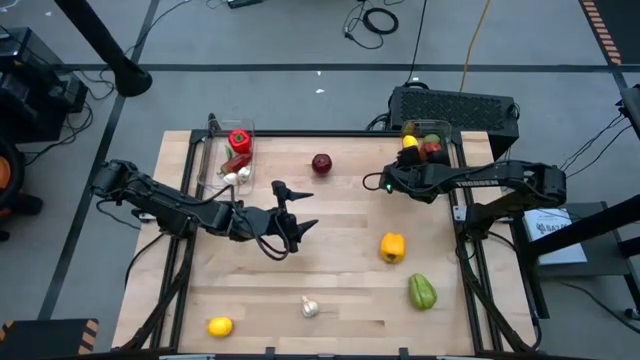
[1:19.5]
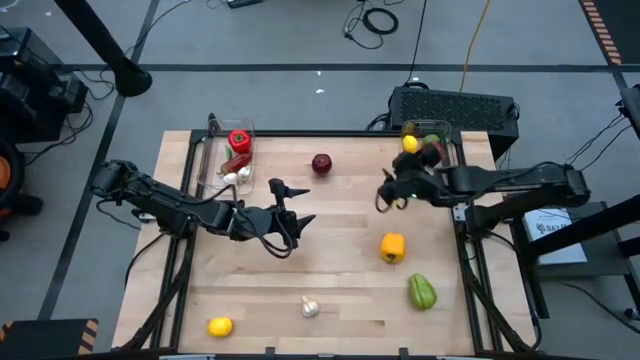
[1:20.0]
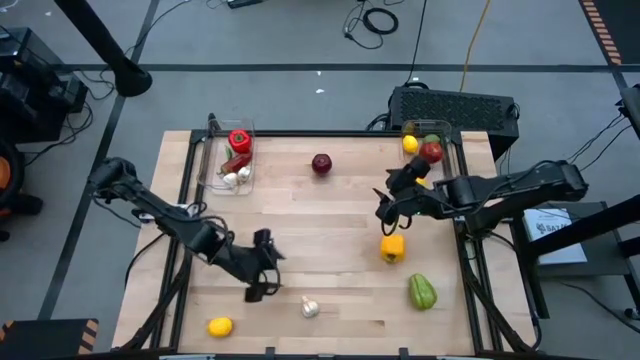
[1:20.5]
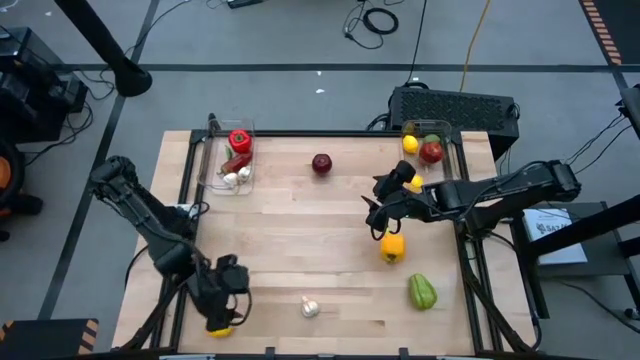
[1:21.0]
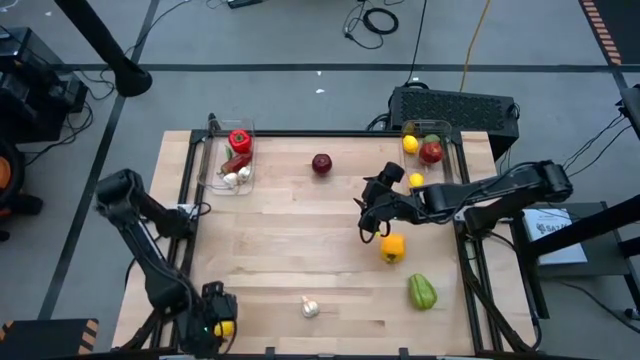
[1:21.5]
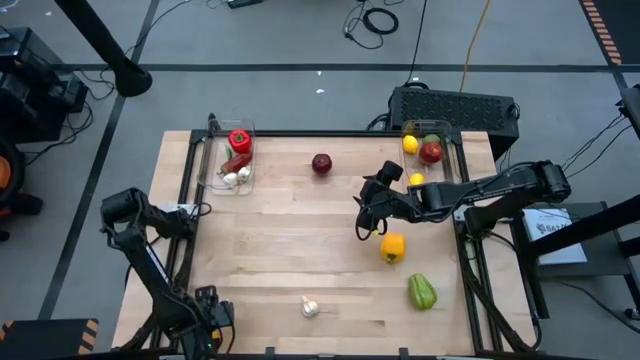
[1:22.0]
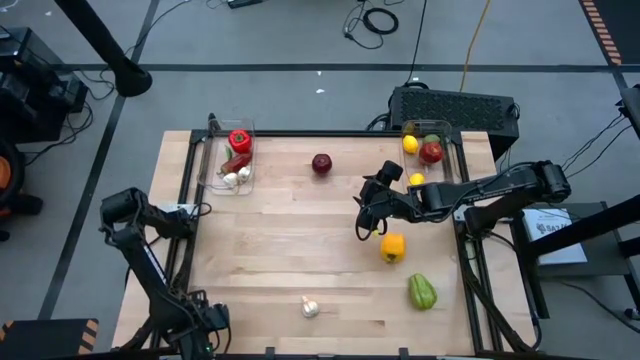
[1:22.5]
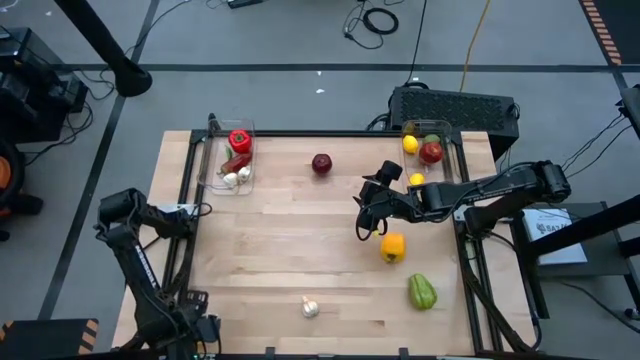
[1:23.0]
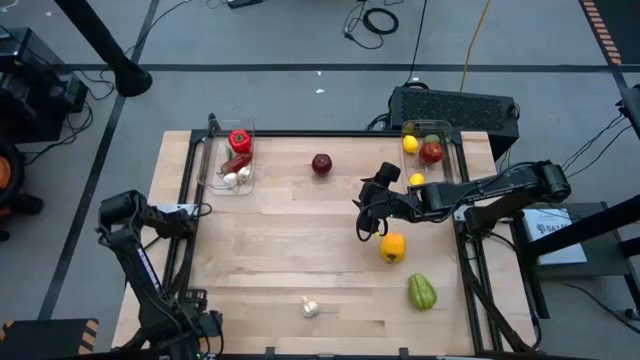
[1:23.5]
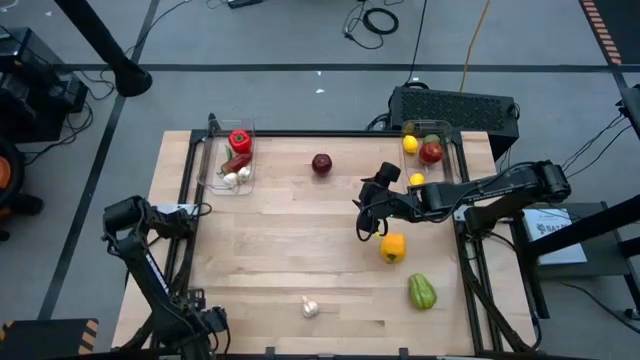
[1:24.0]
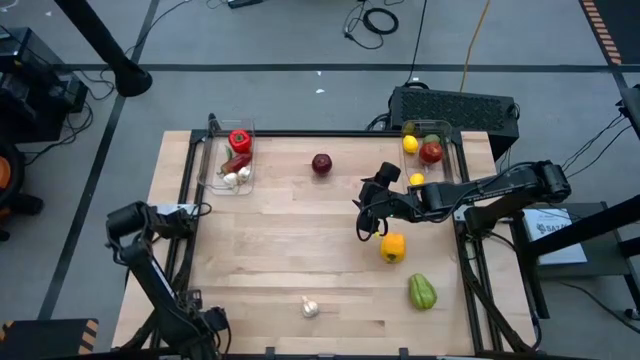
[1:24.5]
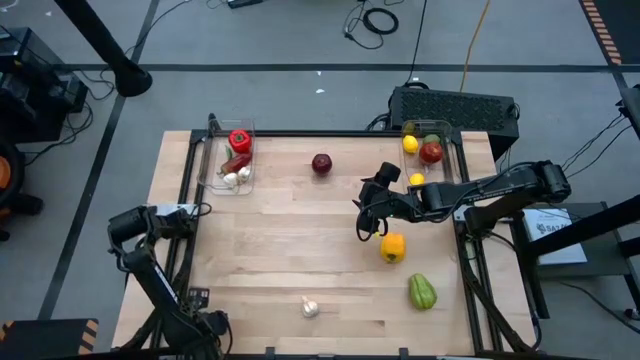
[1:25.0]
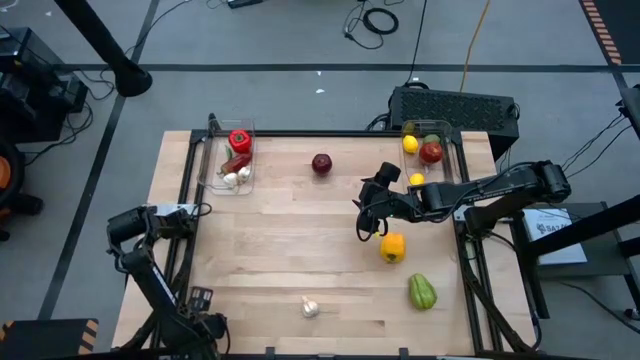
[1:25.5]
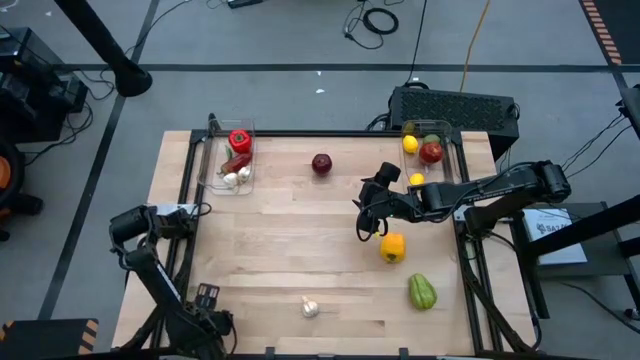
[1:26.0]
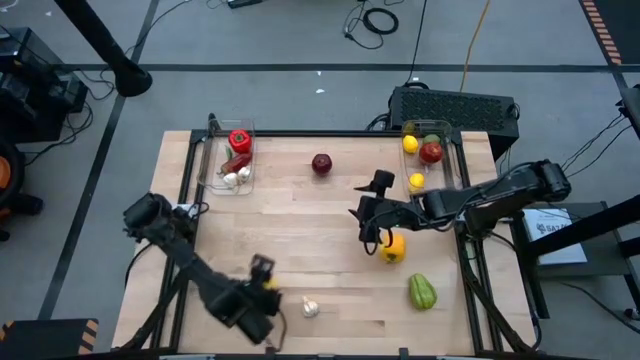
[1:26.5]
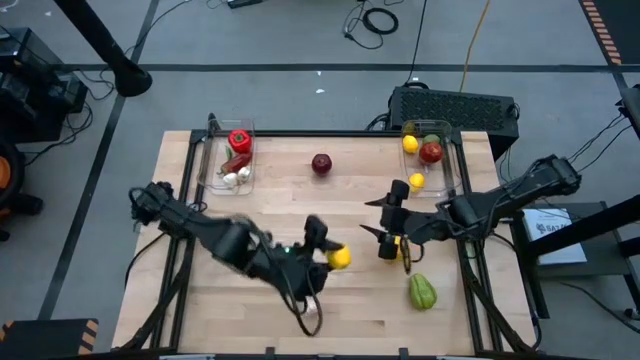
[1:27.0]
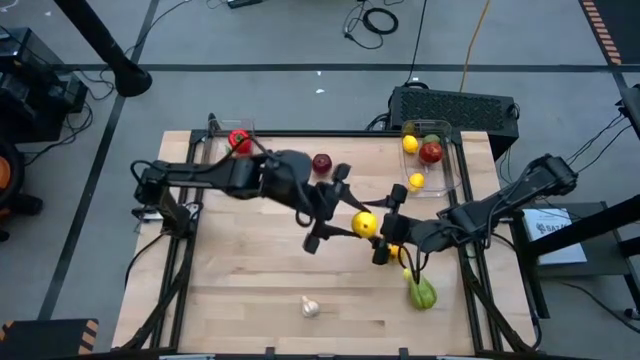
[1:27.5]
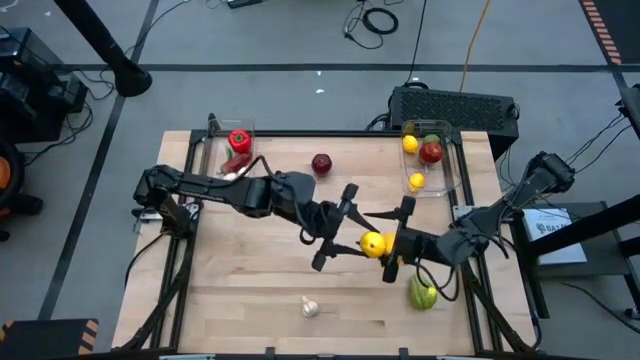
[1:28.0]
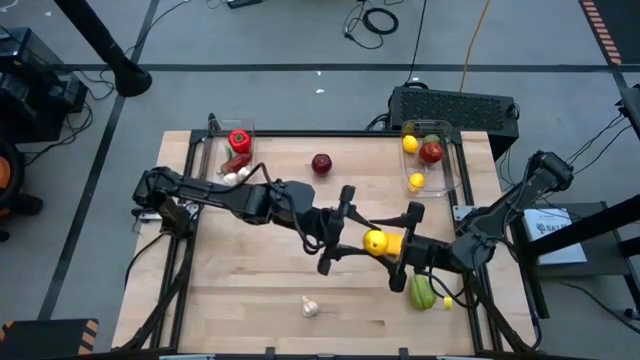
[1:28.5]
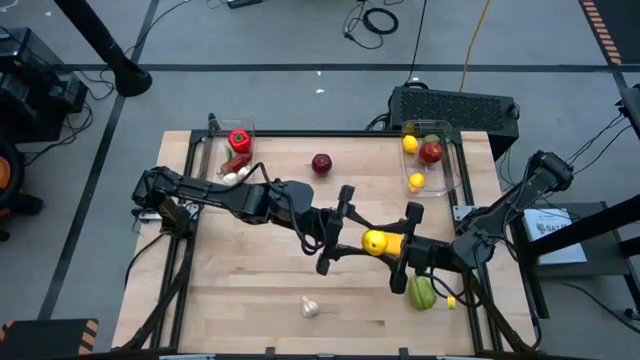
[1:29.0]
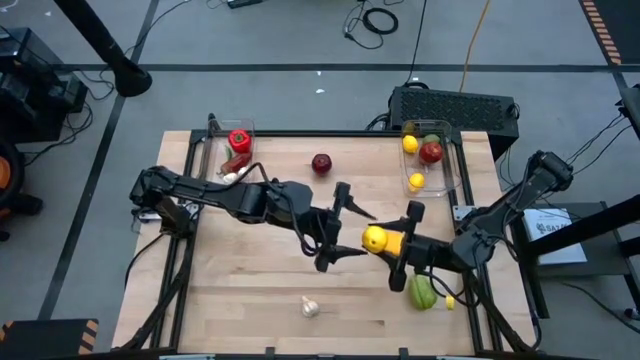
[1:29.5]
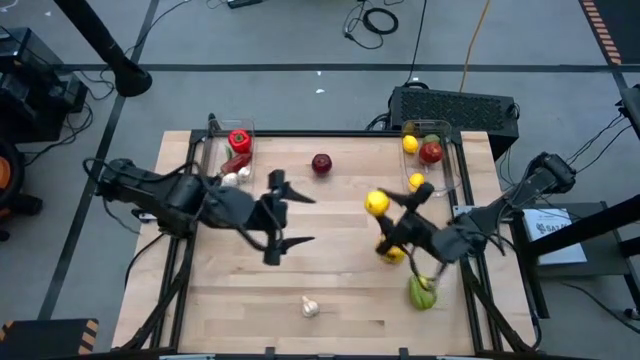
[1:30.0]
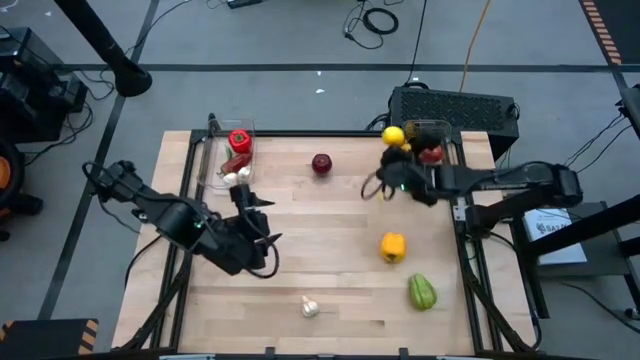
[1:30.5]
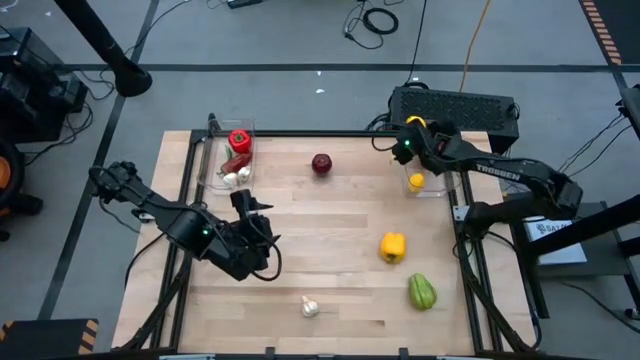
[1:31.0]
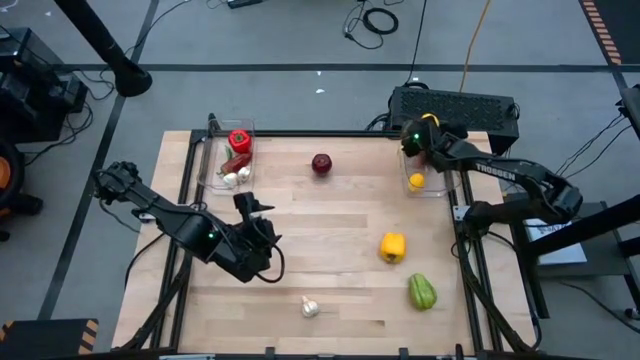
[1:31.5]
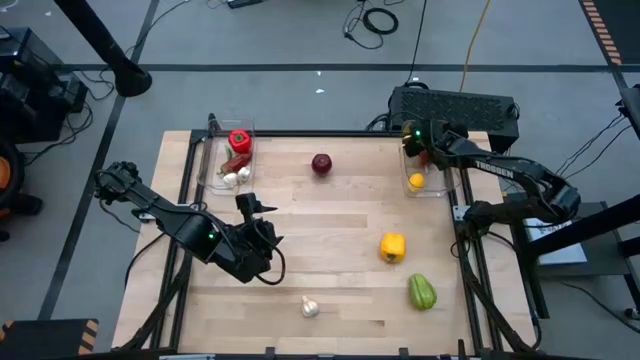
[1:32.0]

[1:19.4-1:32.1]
Task: Sort produce into baskets
Put the lemon into the right transparent bin

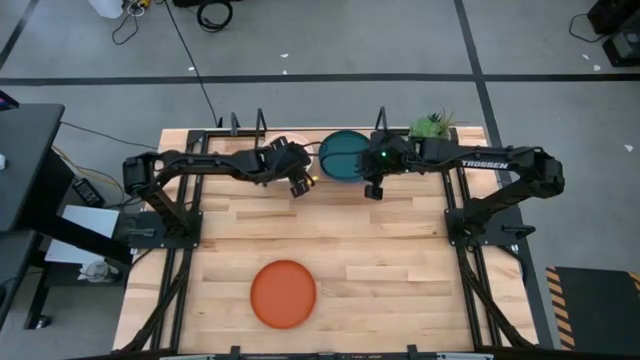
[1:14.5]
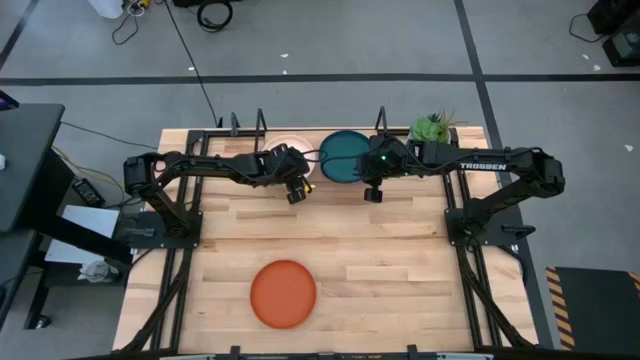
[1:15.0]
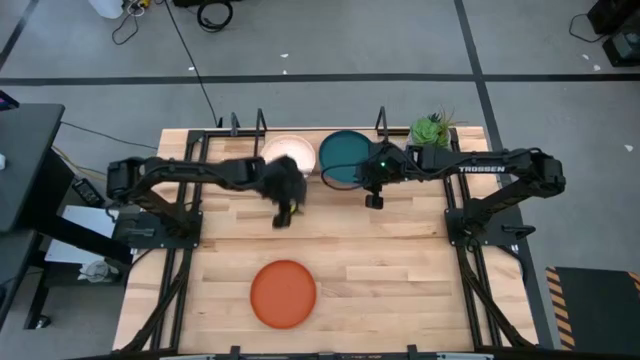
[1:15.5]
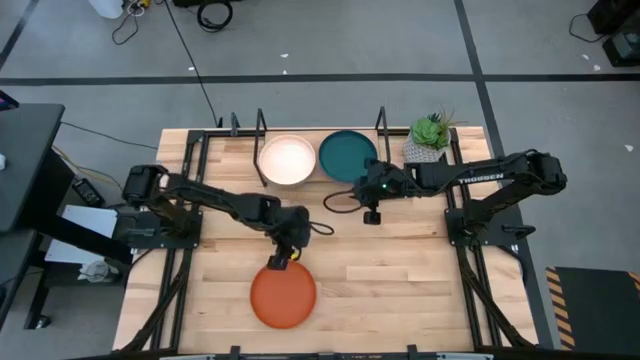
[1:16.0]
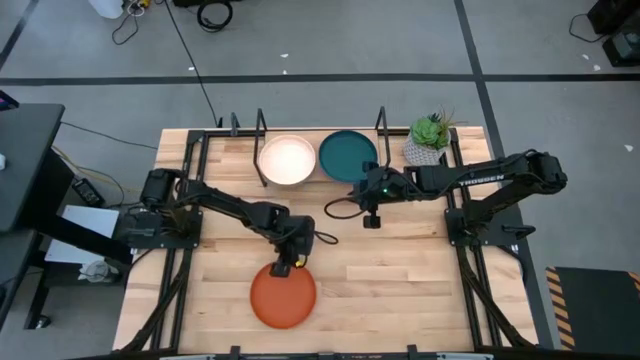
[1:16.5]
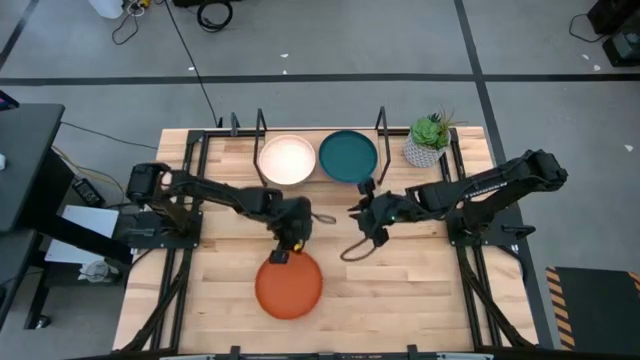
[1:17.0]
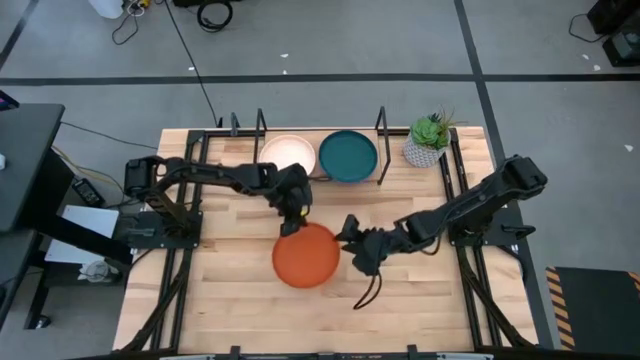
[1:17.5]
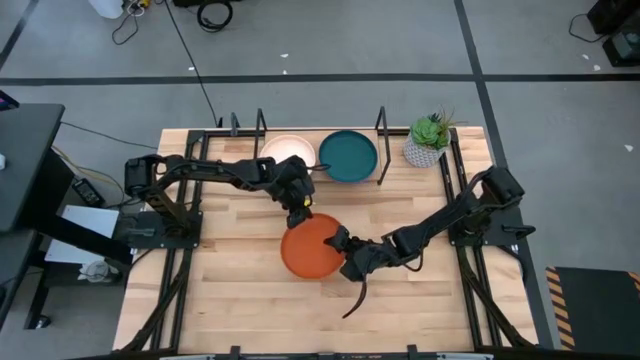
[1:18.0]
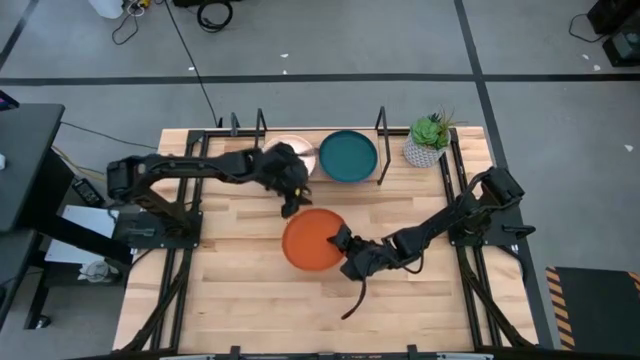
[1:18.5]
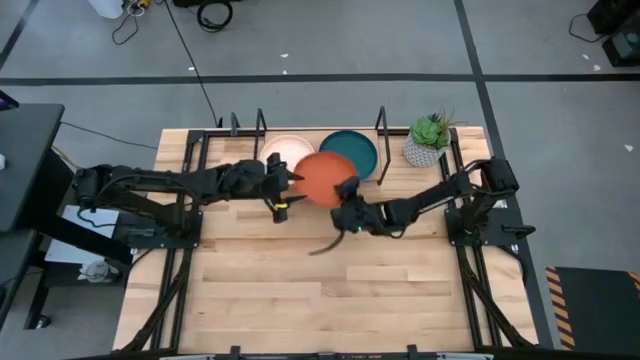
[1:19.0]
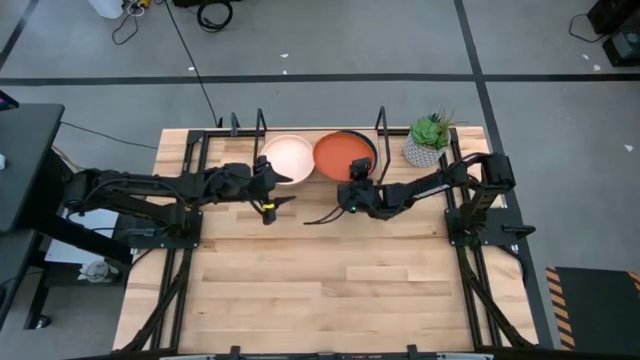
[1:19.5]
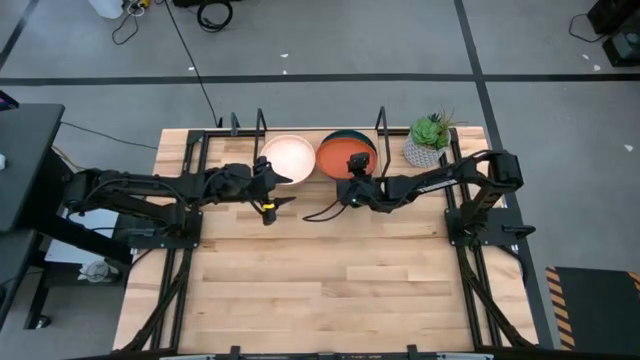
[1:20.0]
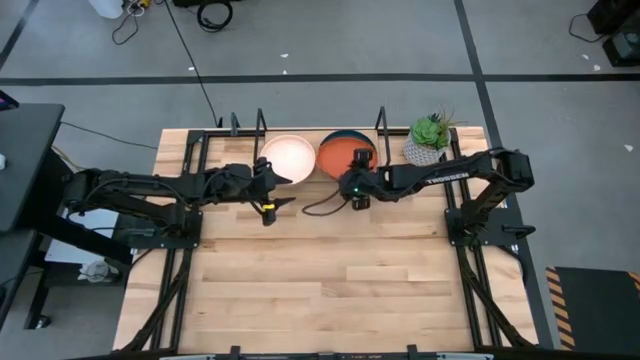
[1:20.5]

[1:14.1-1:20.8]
Task: Place and stack plates onto a shelf
Stack the orange plate on top of the dark green plate on the shelf

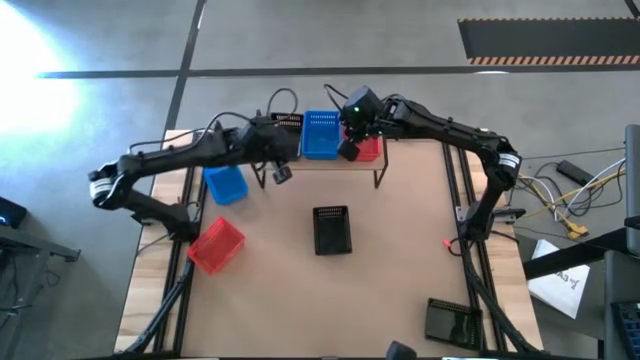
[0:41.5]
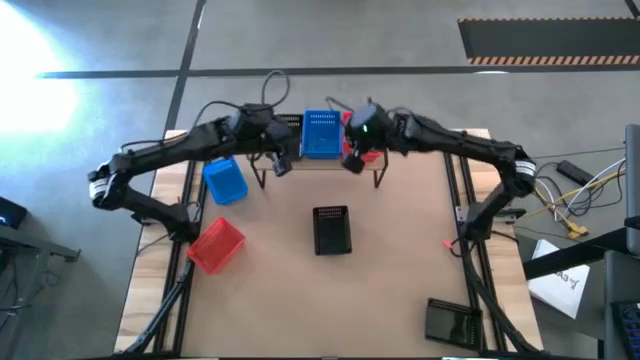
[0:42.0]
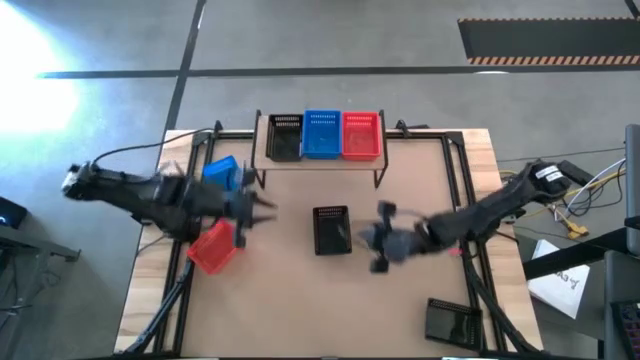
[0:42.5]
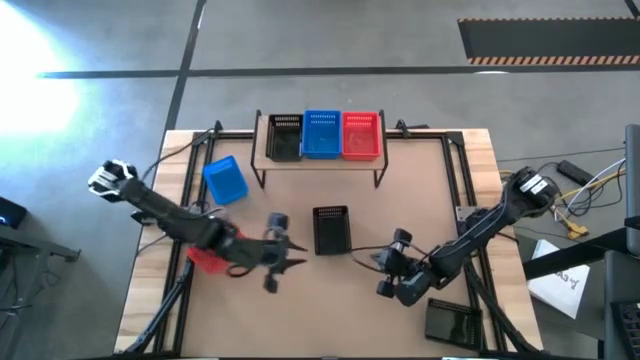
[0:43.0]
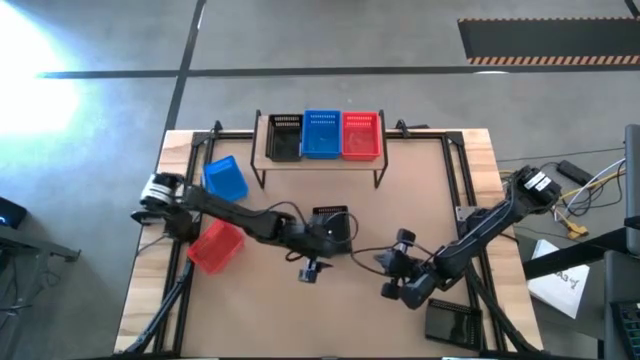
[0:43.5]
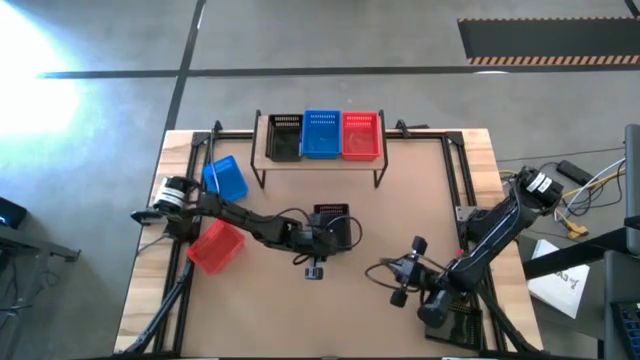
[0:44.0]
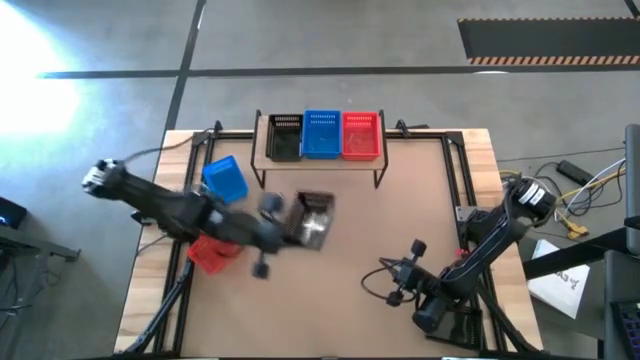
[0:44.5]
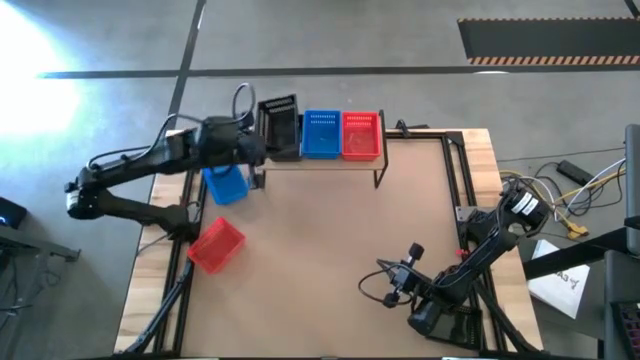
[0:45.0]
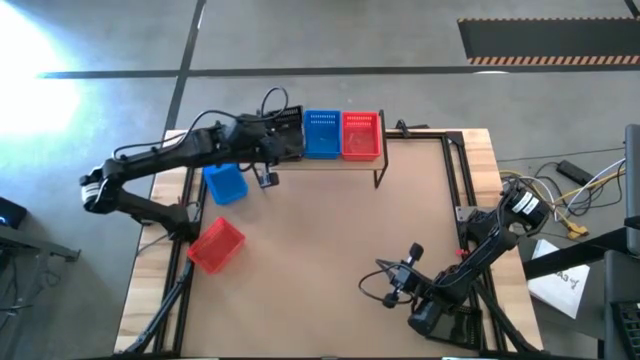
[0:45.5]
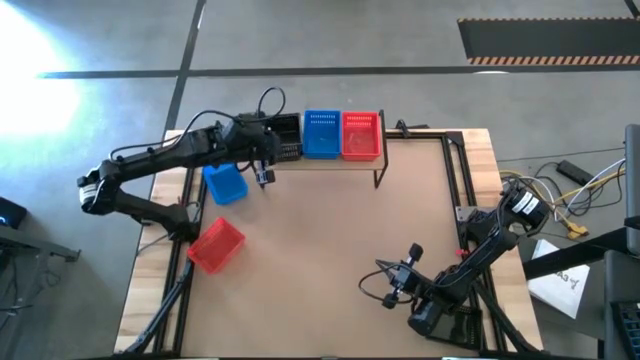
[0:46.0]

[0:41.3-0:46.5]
Task: Stack baskets on shelf by color
Stack the top black bin on the black bin on the shelf
